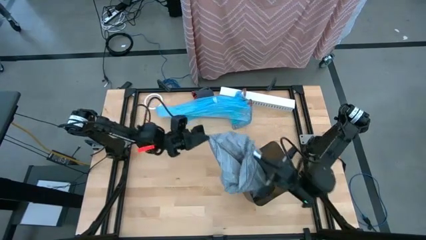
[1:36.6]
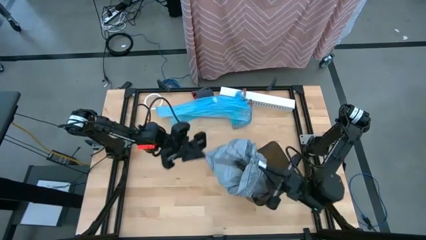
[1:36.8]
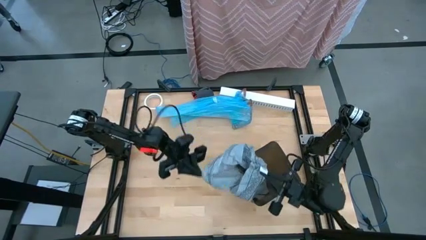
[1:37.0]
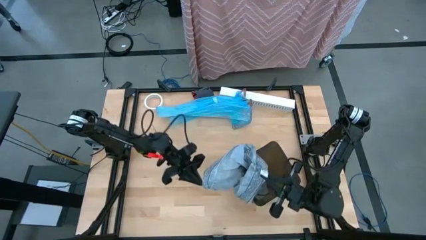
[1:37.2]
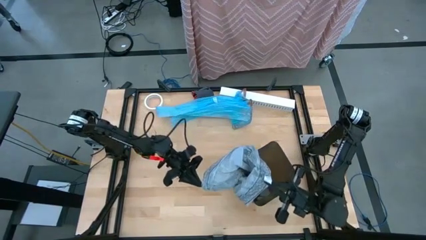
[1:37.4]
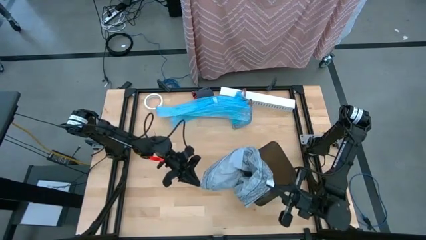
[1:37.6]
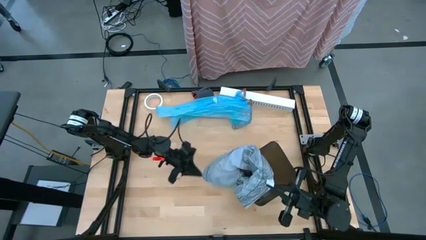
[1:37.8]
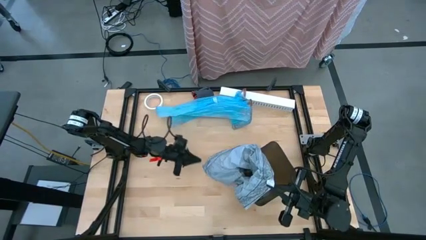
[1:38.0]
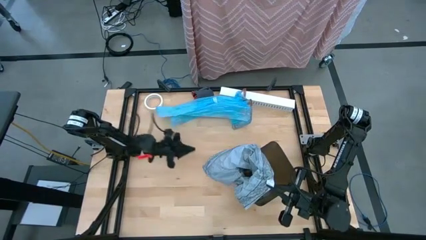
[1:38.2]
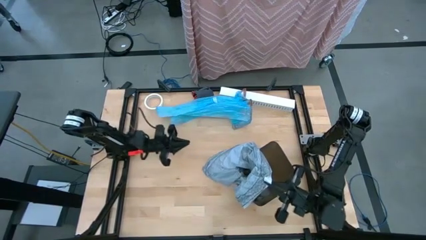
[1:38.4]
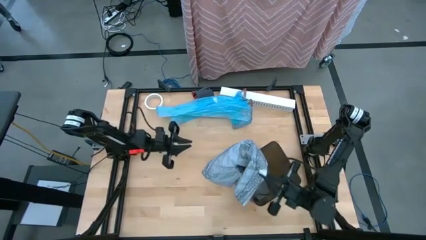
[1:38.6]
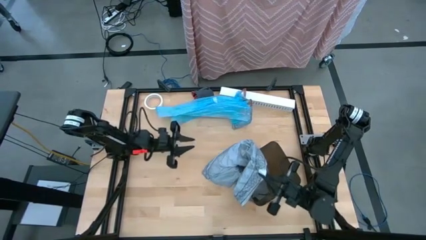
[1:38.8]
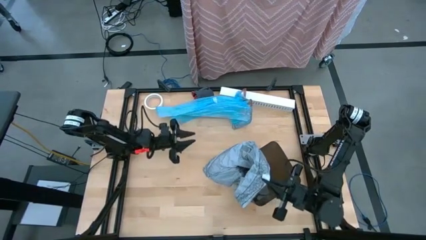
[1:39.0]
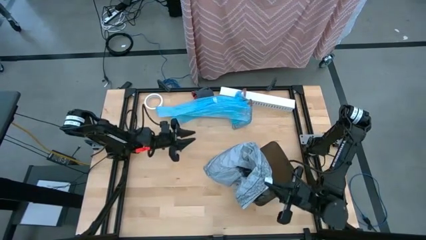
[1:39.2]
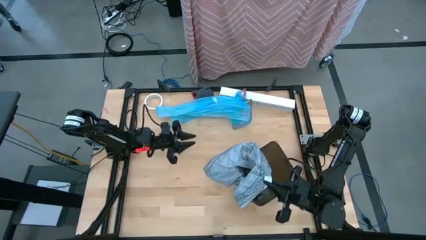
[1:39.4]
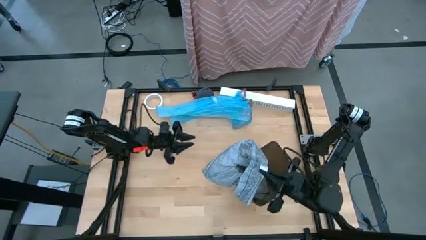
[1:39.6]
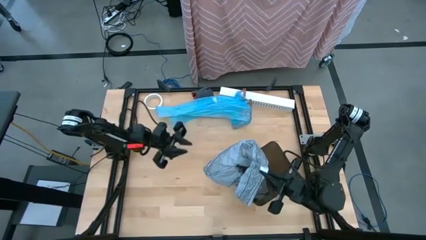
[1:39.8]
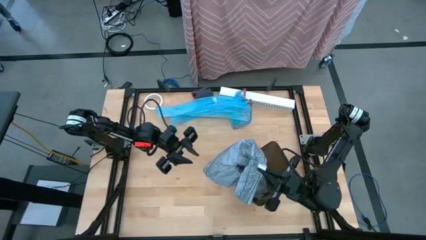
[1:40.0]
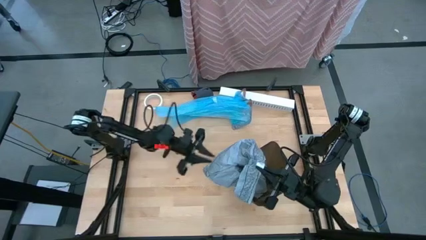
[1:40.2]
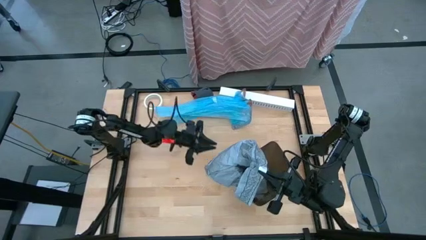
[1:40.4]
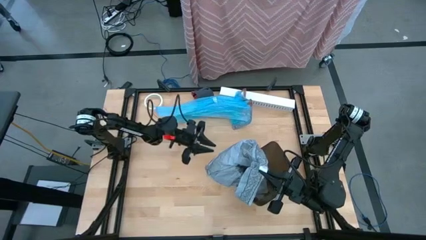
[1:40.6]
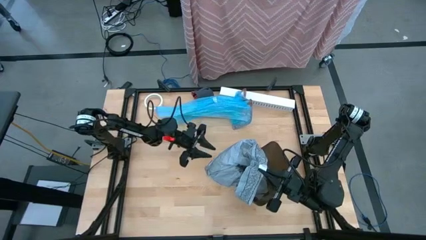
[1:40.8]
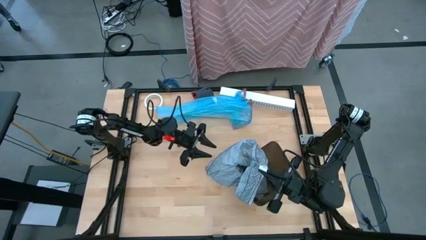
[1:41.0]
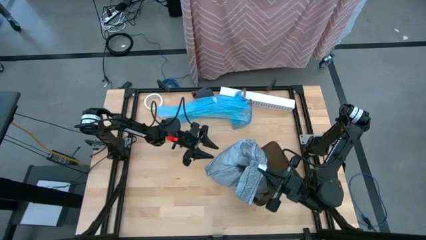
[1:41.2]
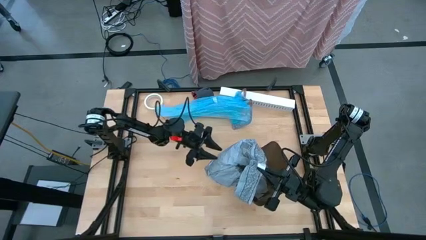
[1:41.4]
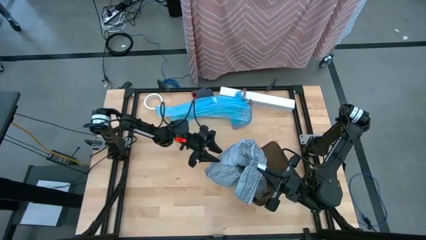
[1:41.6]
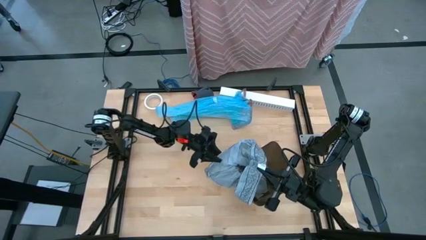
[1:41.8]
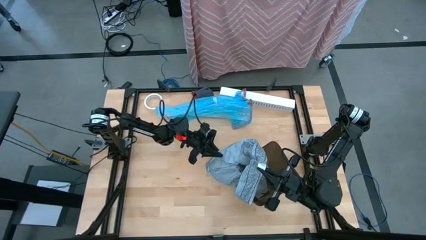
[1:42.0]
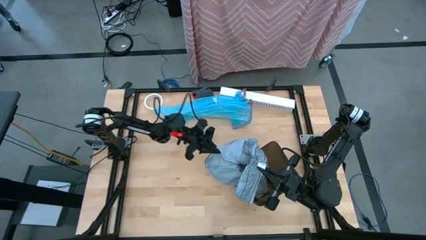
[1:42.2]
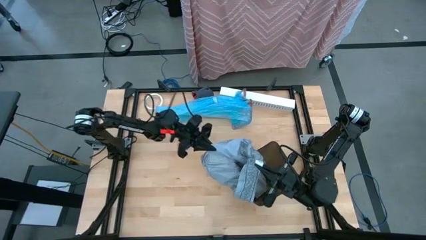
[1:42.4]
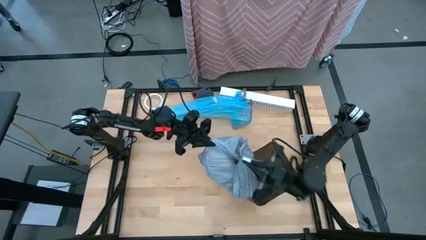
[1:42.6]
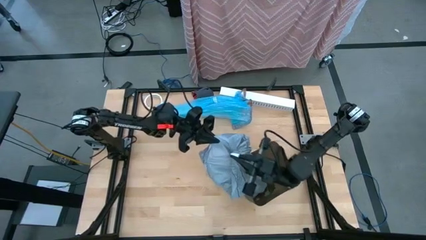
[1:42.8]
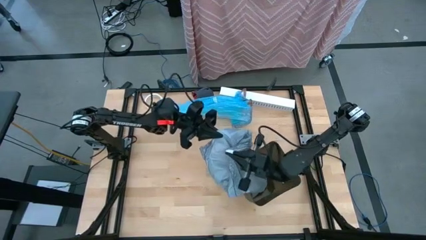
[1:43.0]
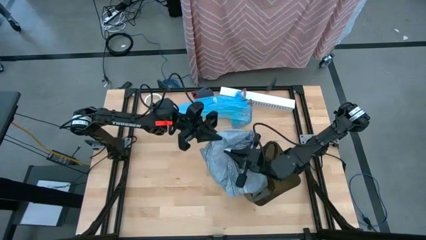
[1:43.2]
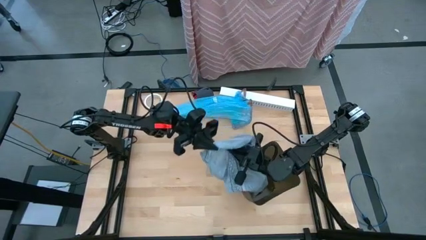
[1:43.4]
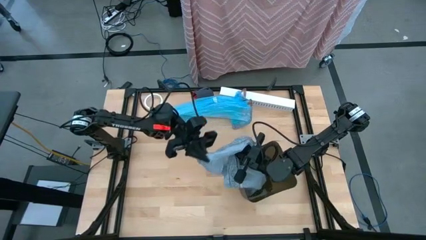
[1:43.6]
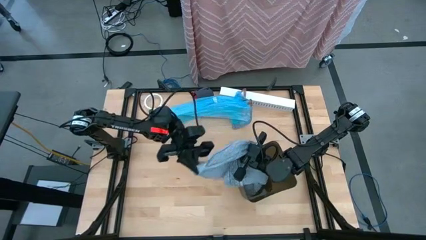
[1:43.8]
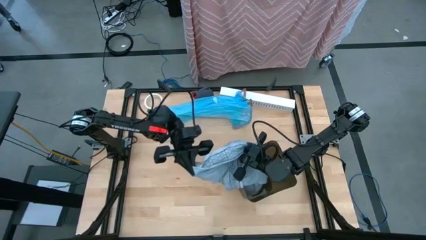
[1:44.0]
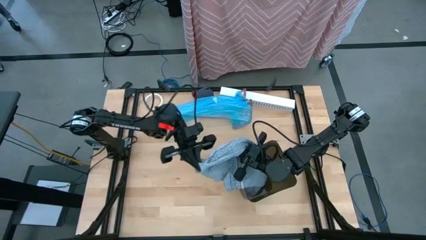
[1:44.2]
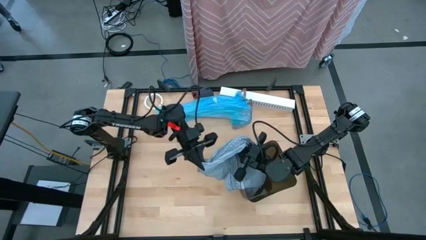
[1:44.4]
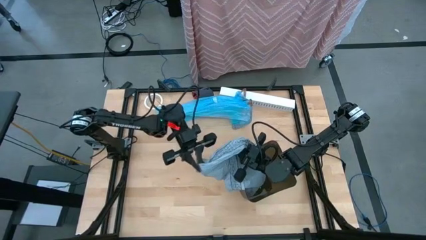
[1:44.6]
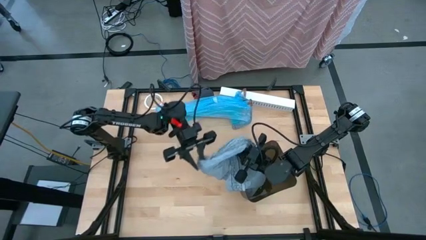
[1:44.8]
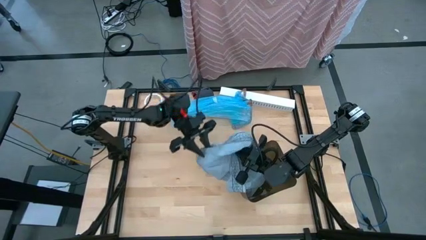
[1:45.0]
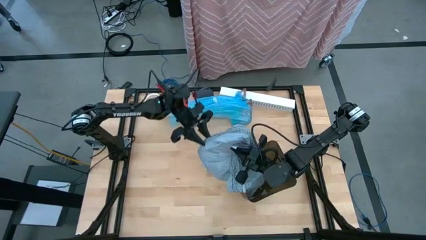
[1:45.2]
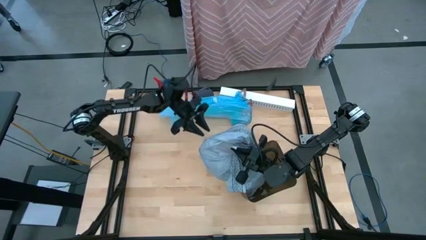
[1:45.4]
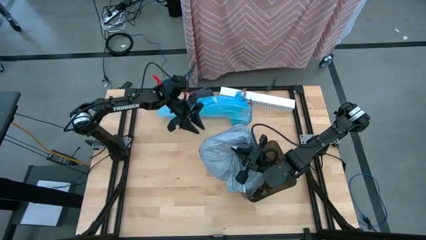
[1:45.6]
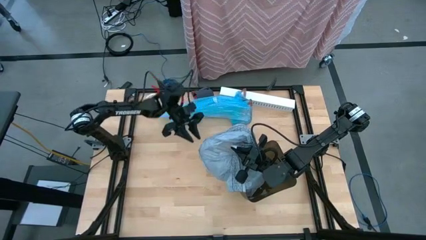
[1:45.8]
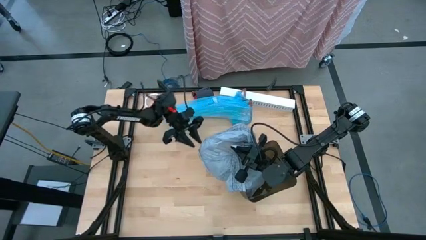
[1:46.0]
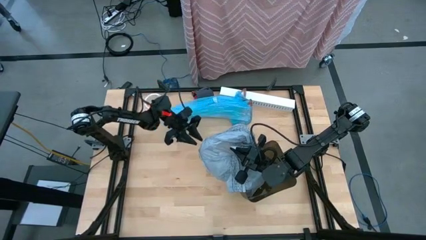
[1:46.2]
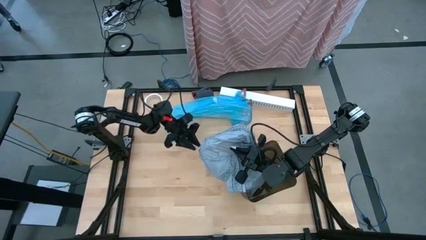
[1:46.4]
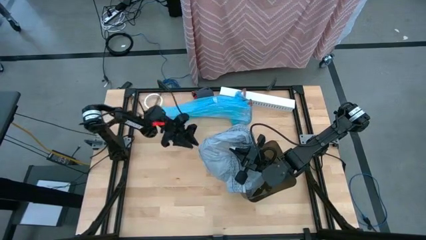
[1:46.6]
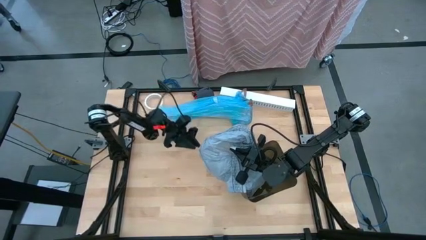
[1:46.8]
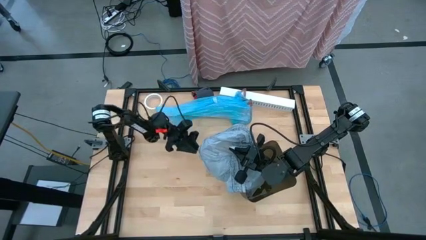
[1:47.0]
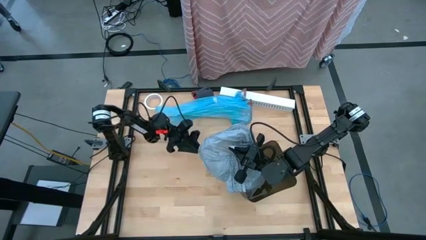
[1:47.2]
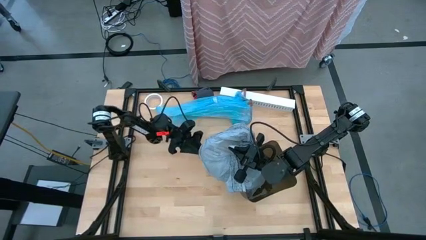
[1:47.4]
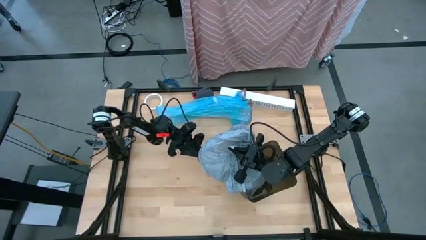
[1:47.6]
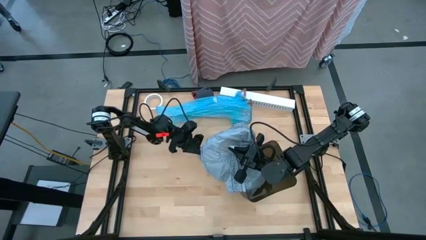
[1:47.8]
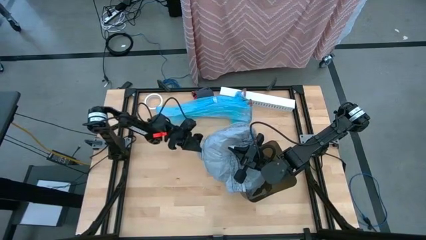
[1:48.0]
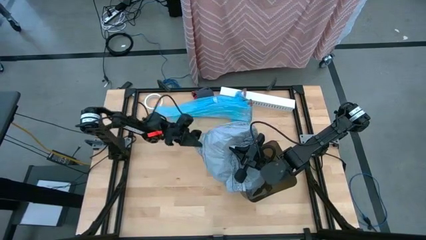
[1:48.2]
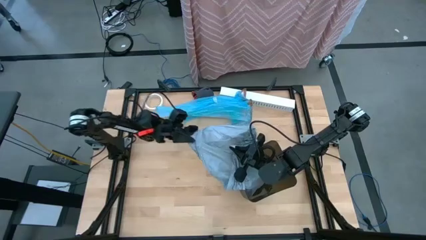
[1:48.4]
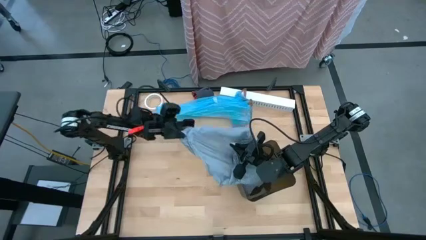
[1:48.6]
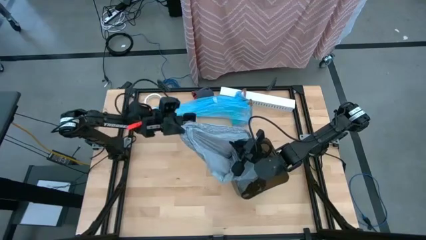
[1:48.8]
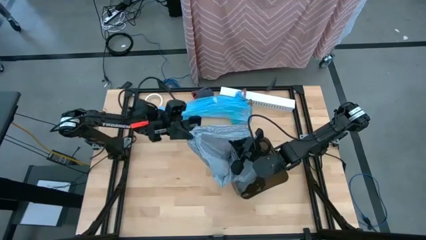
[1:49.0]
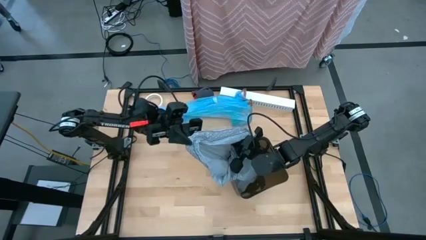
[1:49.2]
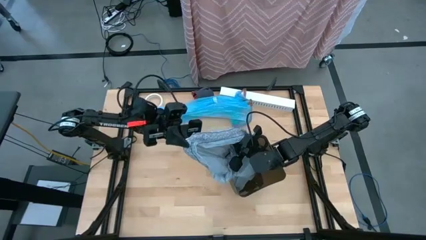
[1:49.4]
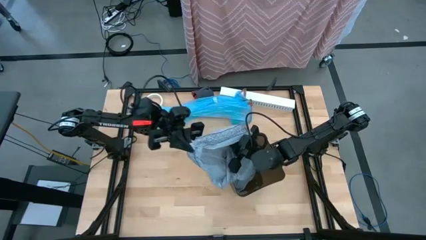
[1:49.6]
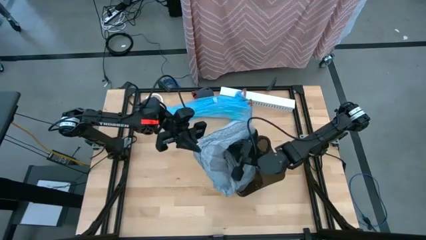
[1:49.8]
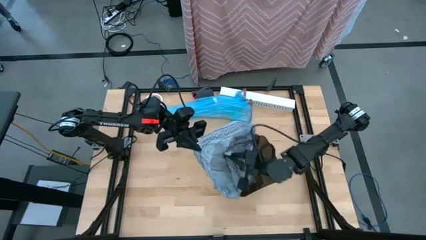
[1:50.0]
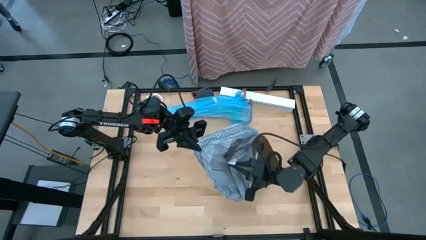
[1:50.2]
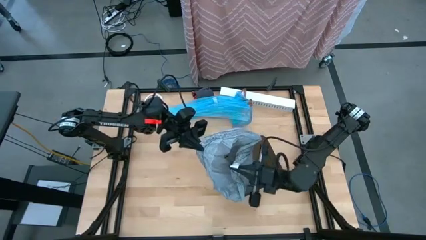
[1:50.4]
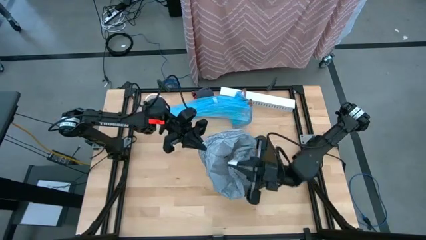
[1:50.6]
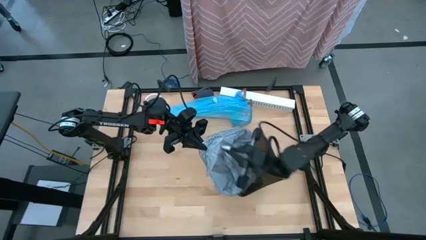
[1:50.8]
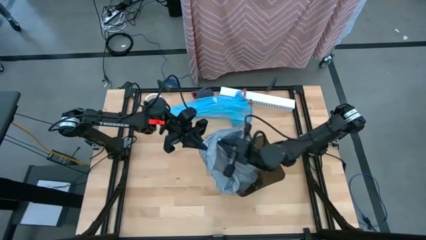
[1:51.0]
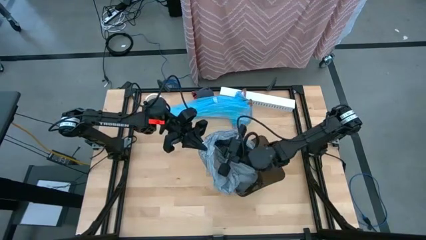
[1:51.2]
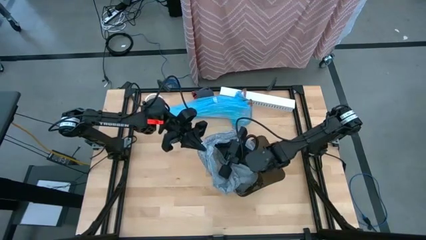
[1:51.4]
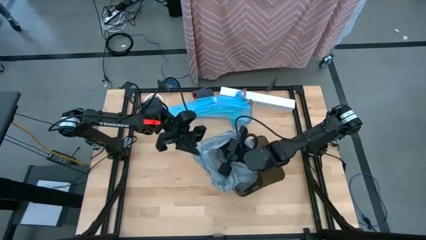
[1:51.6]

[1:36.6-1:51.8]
Task: place trash/remove bag and relplace
Remove the blue trash bag from the black trash bin using the drawstring
